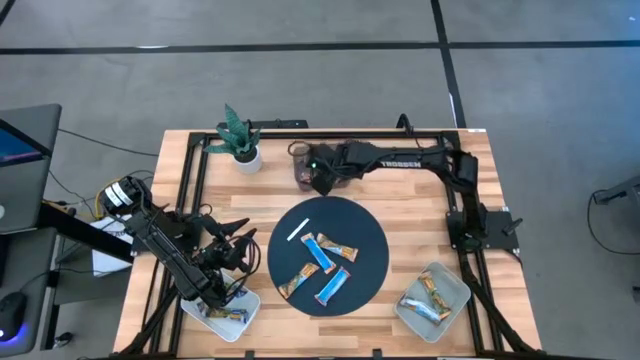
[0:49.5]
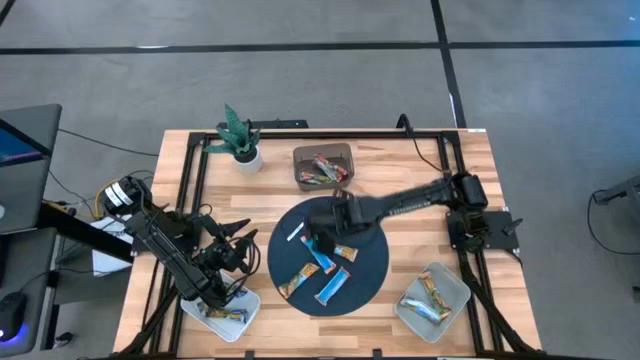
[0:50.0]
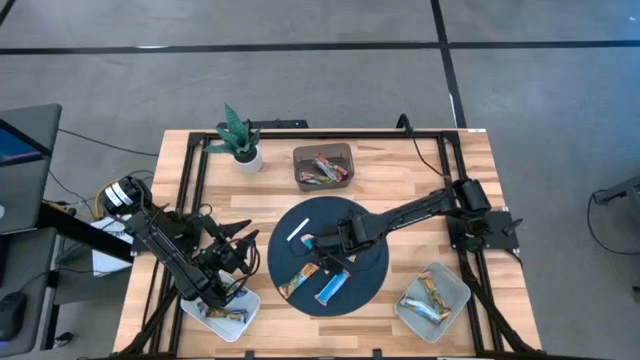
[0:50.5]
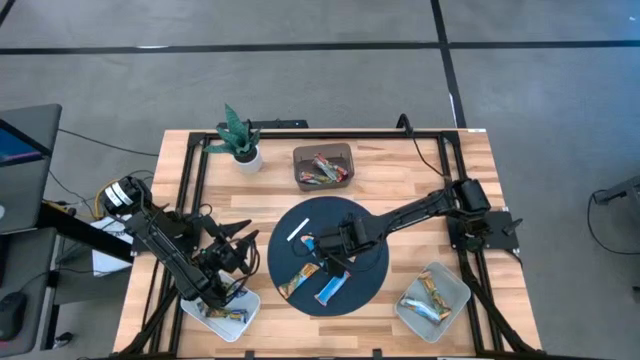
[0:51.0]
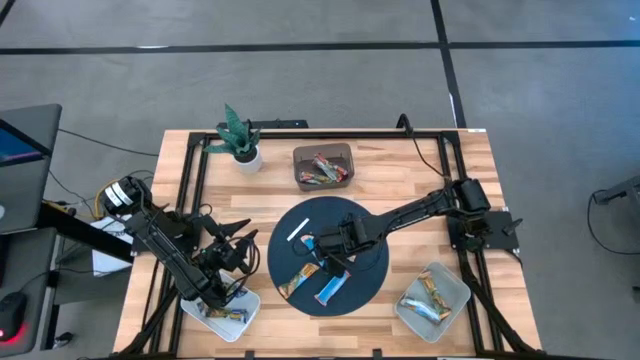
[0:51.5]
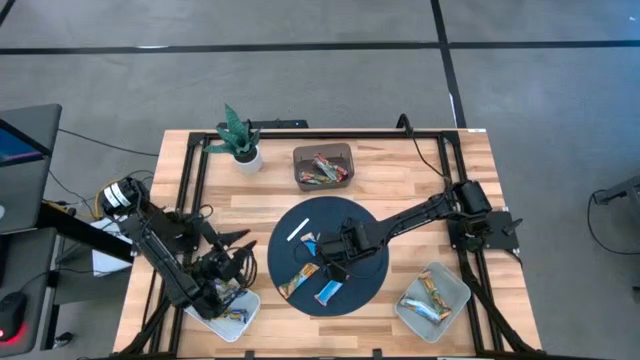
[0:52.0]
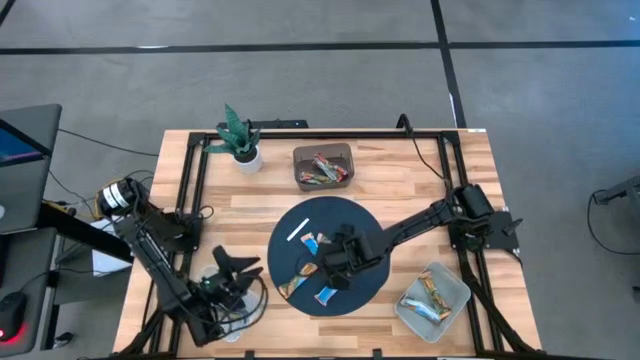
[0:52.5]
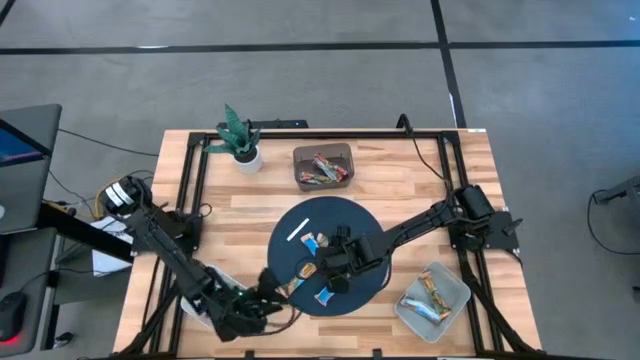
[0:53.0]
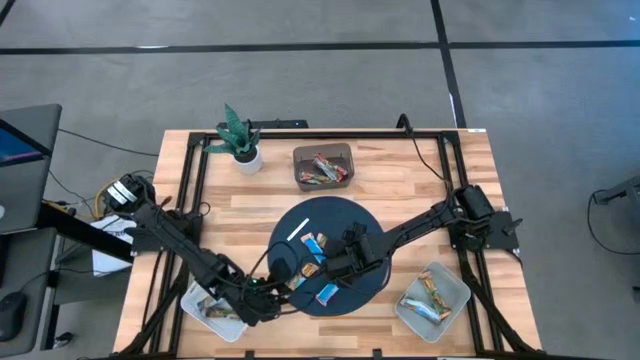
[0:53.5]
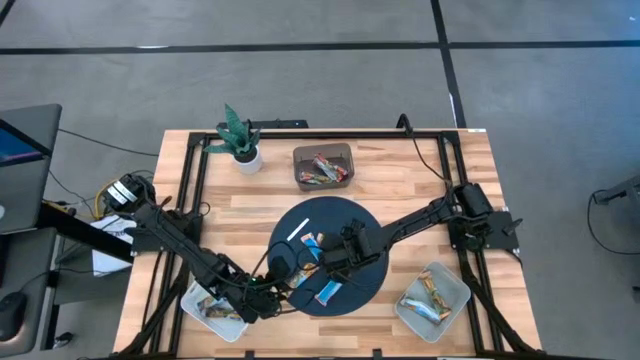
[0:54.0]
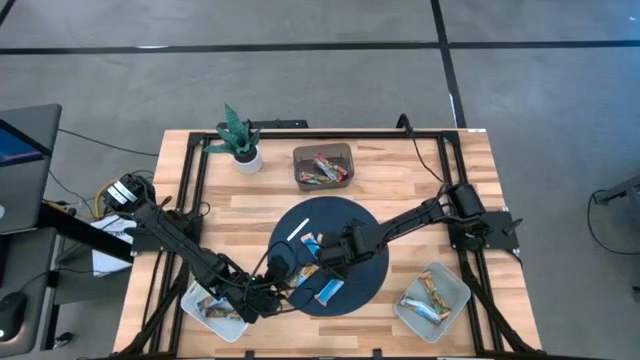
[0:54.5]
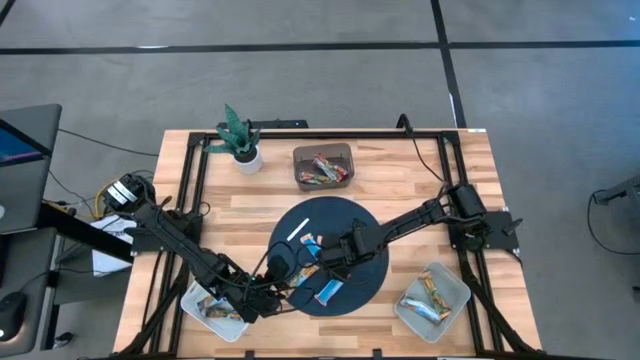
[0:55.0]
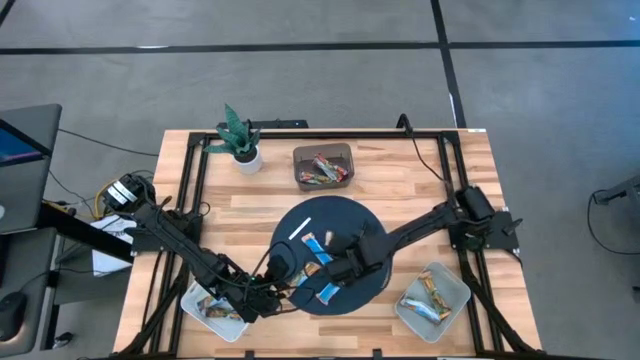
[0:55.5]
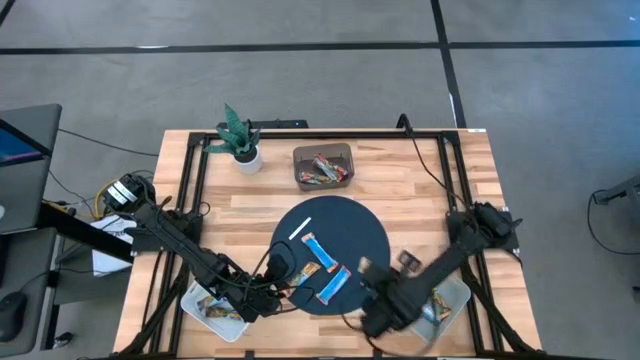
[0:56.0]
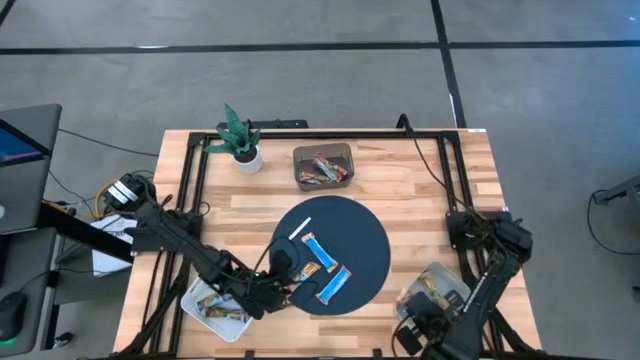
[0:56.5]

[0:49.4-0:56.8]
Task: Pick and place Granola Bars by type
Put the yellow granola bar into the gray bin

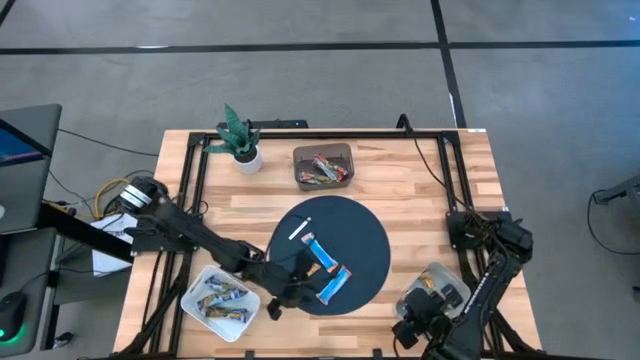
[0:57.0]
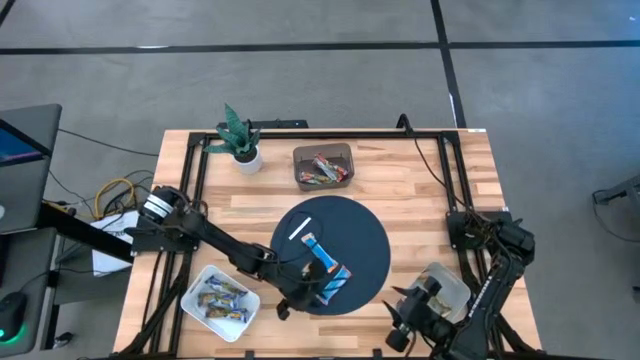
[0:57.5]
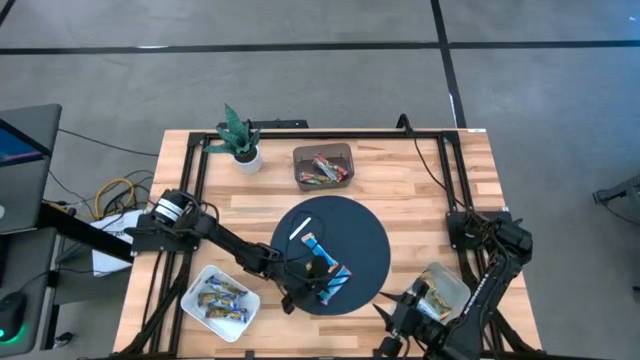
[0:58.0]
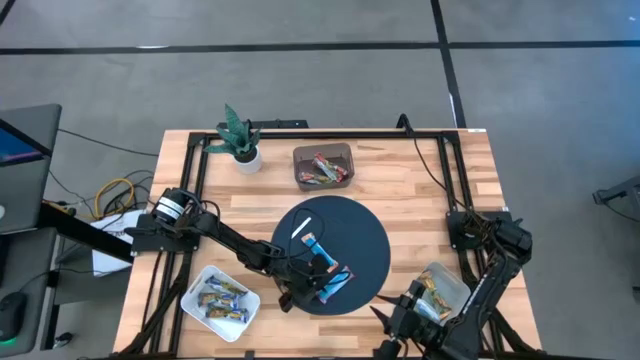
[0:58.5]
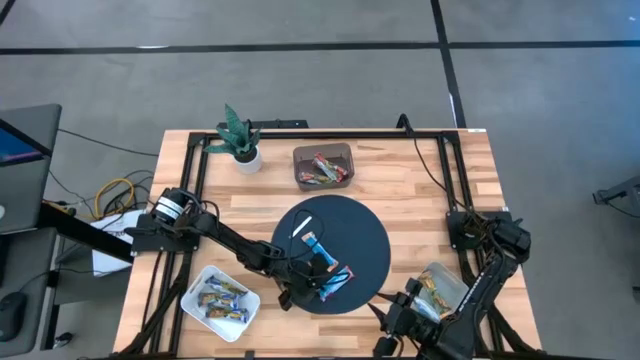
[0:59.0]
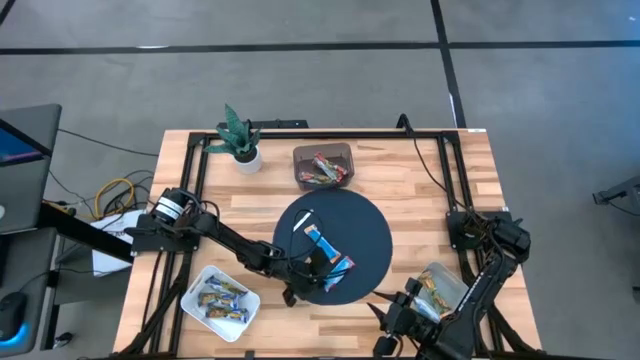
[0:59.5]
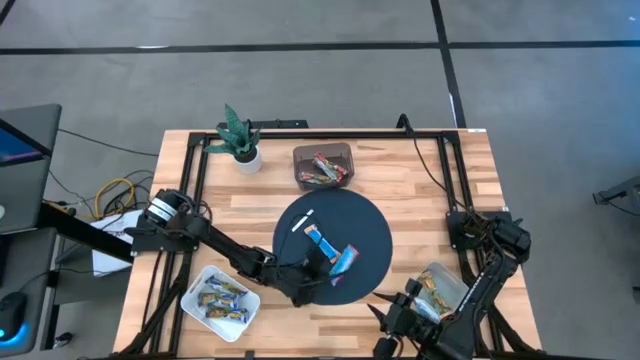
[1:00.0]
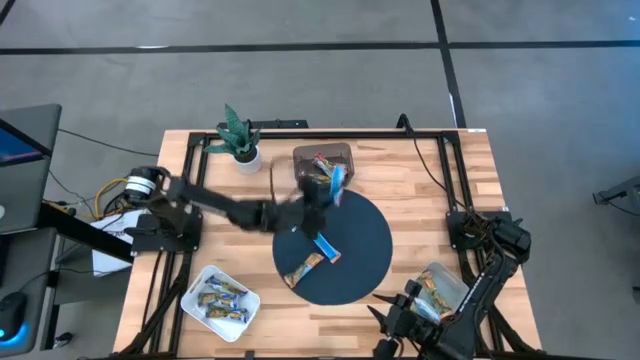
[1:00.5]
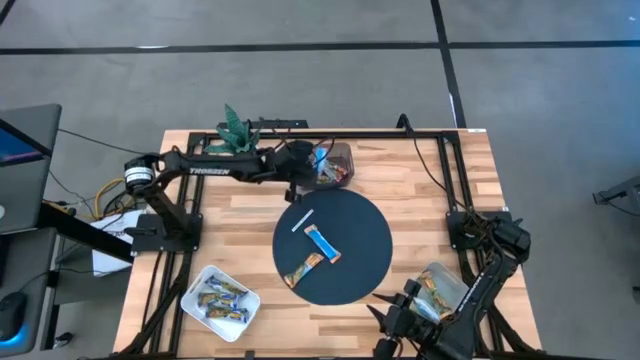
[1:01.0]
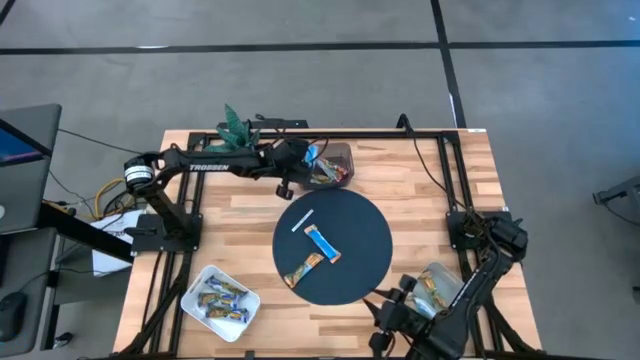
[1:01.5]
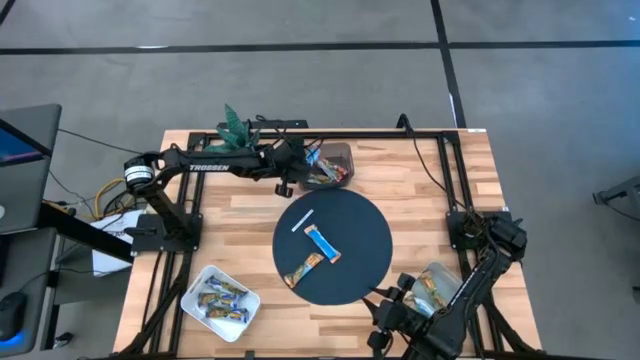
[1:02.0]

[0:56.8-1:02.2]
Put the red granola bar into the black bin

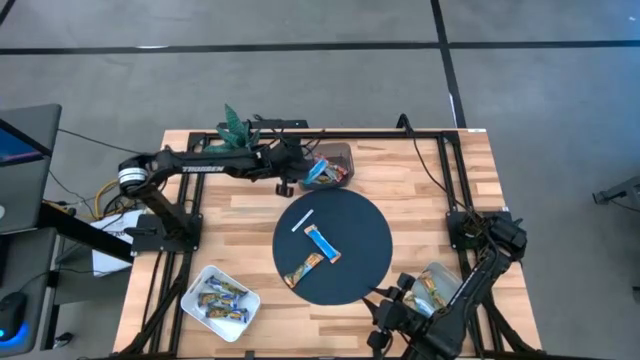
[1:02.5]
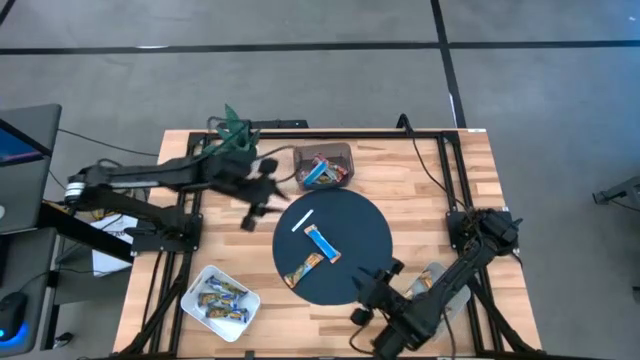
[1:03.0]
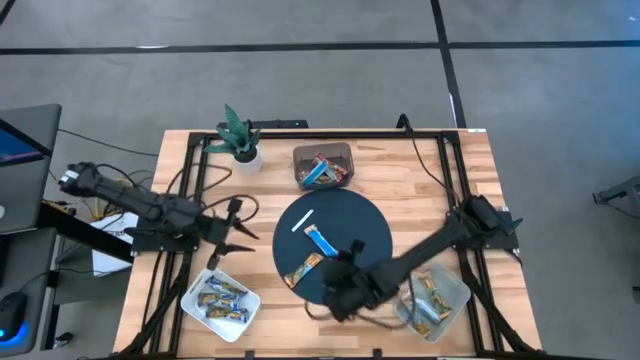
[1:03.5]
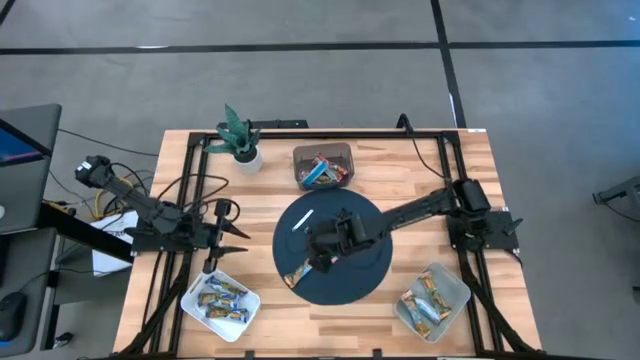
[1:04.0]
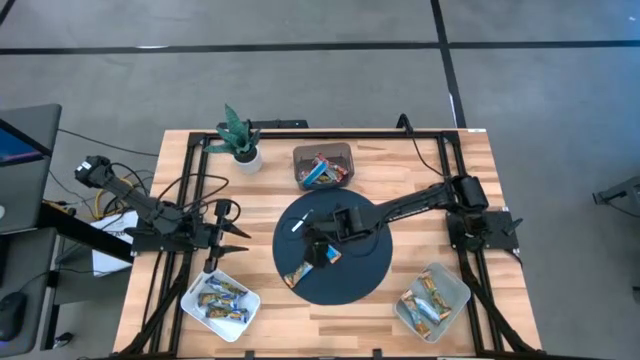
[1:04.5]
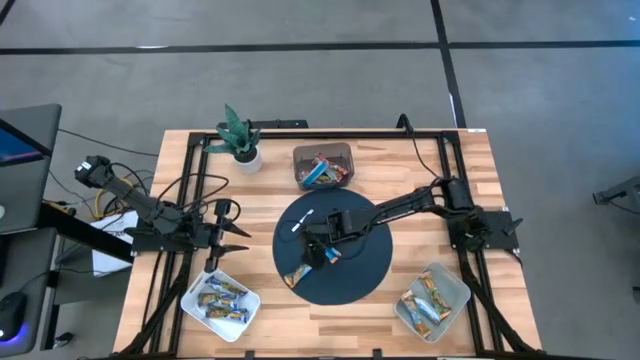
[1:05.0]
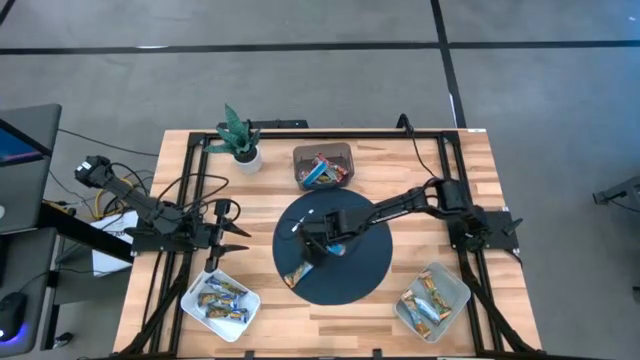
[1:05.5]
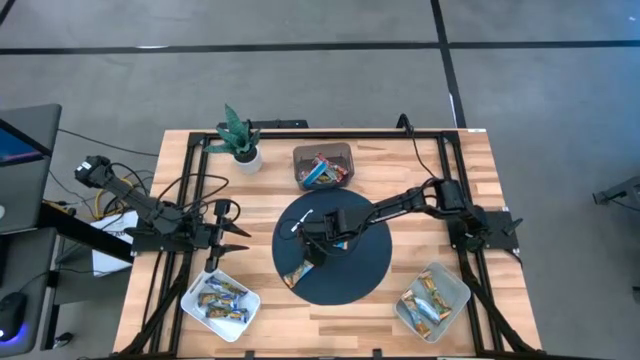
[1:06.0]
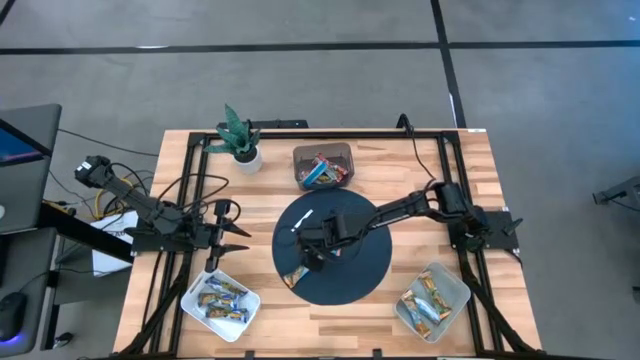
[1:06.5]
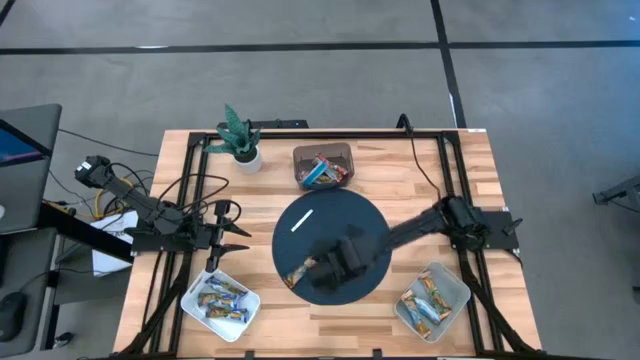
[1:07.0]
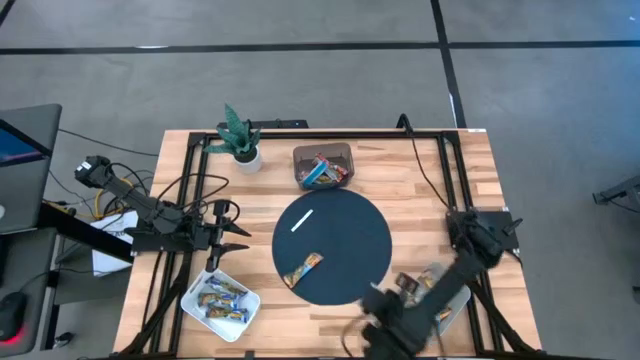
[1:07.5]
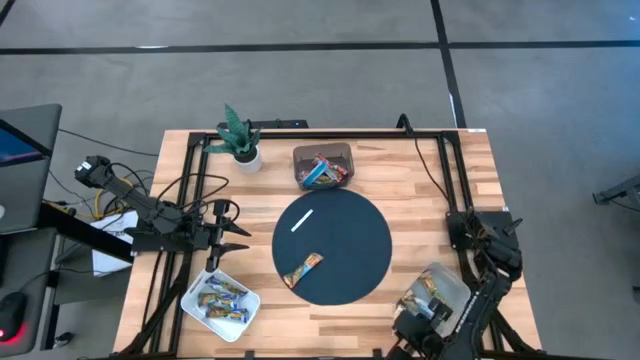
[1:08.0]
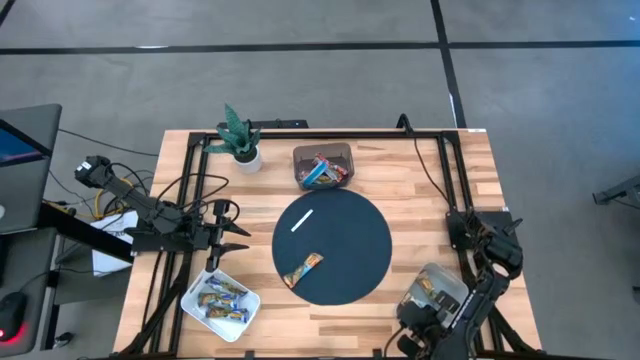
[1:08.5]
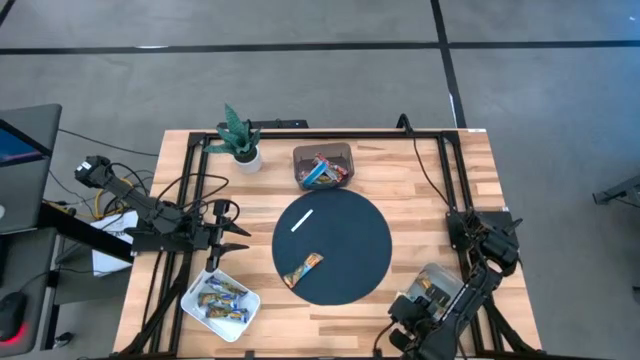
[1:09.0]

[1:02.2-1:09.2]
Put the yellow granola bar into the gray bin
